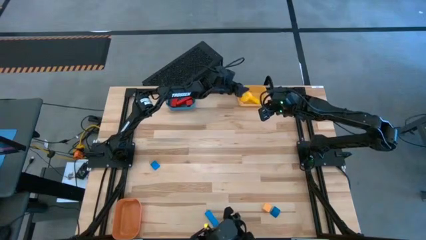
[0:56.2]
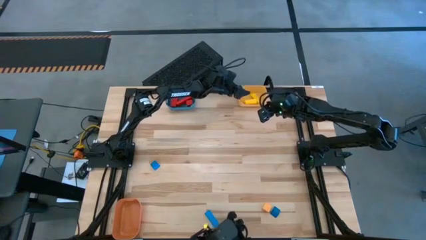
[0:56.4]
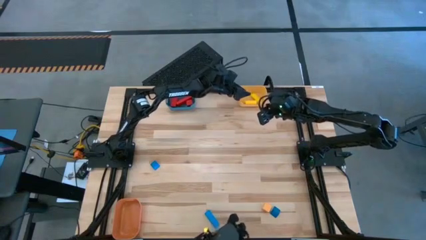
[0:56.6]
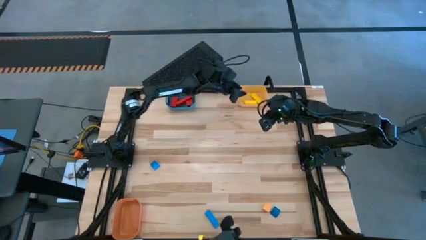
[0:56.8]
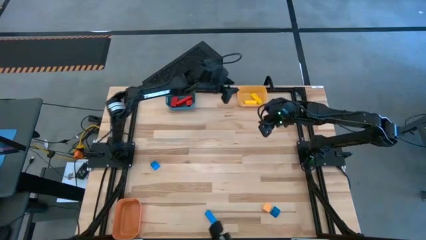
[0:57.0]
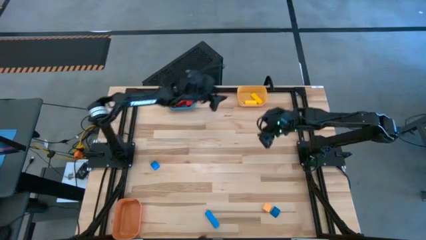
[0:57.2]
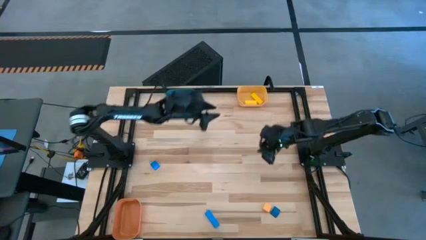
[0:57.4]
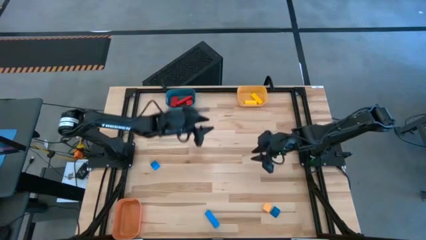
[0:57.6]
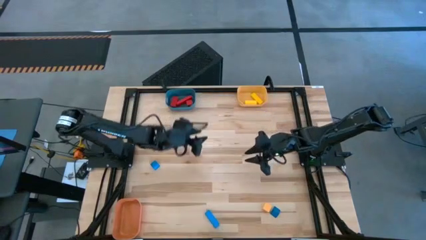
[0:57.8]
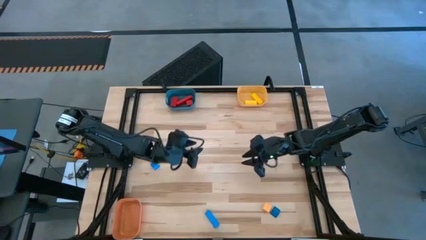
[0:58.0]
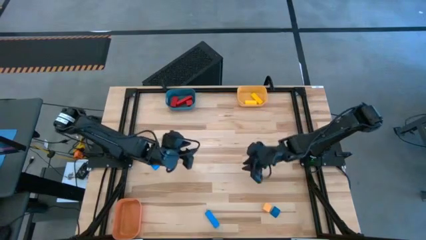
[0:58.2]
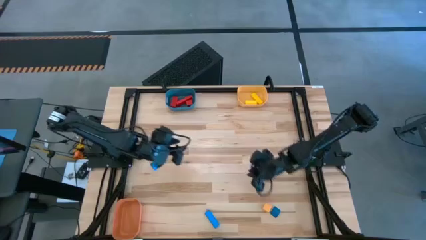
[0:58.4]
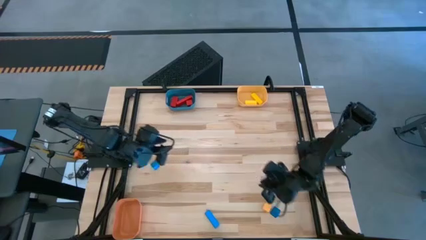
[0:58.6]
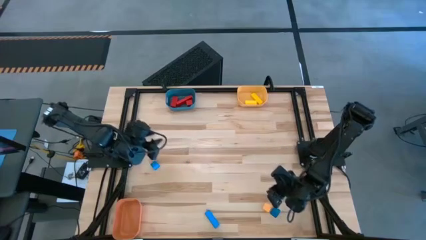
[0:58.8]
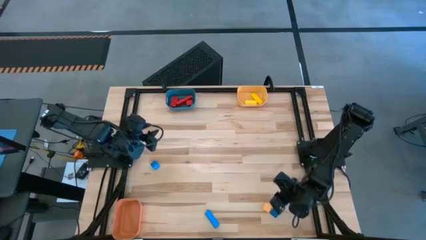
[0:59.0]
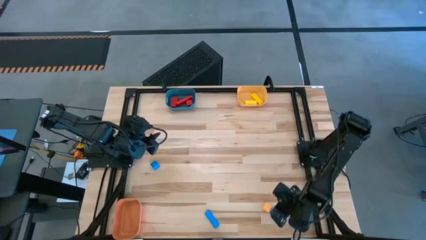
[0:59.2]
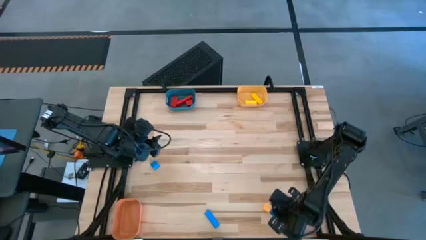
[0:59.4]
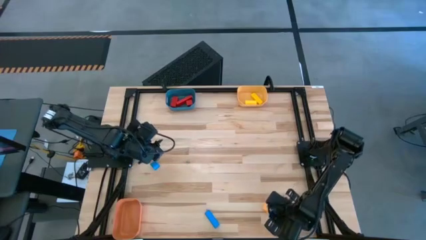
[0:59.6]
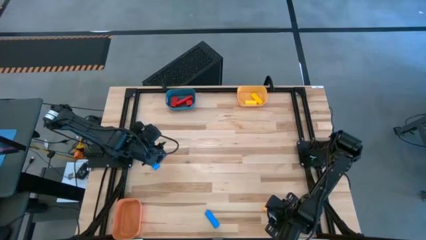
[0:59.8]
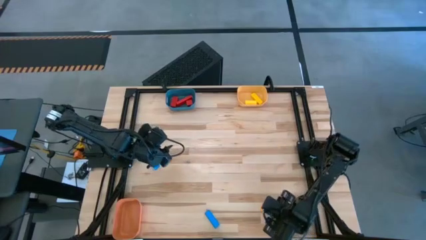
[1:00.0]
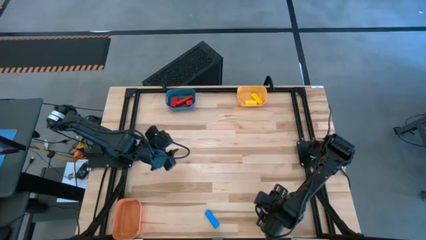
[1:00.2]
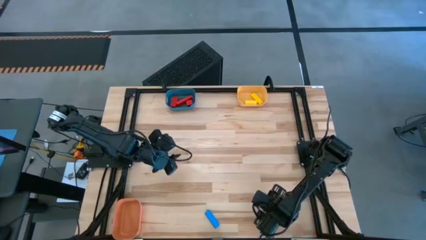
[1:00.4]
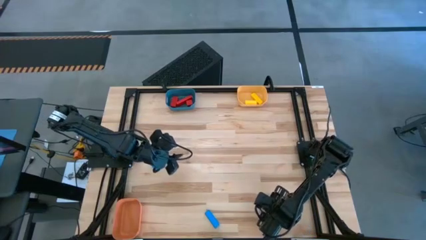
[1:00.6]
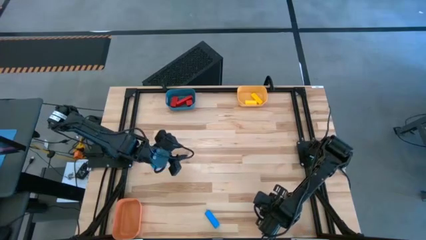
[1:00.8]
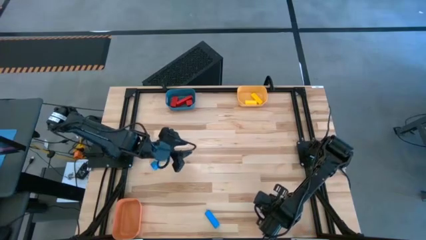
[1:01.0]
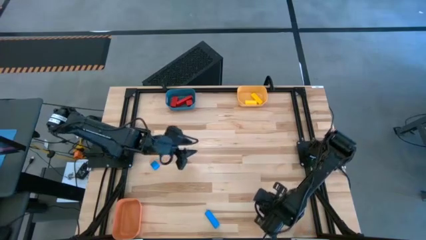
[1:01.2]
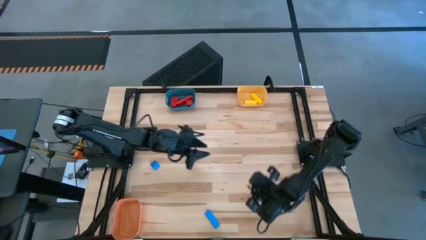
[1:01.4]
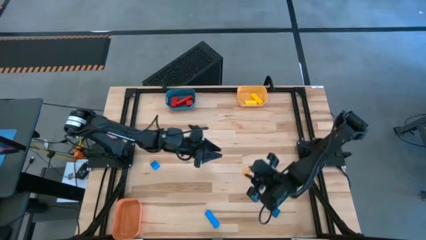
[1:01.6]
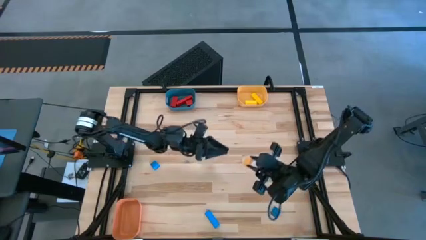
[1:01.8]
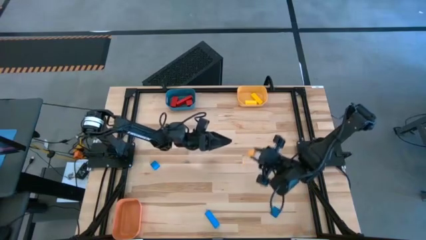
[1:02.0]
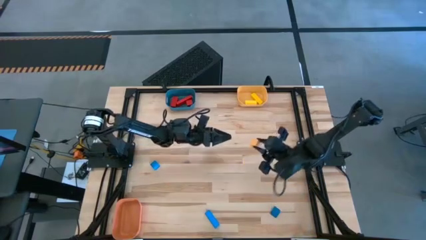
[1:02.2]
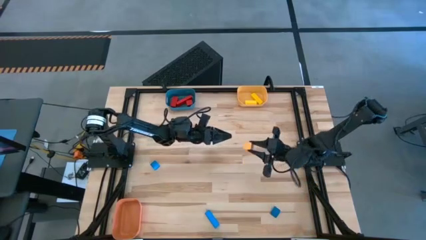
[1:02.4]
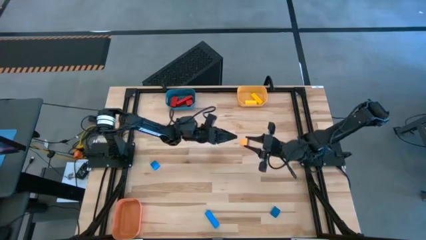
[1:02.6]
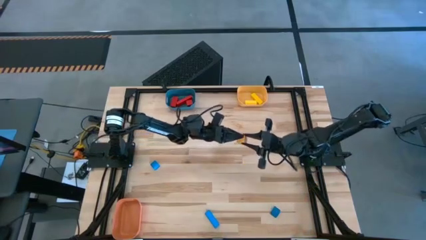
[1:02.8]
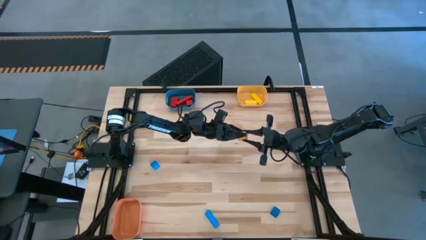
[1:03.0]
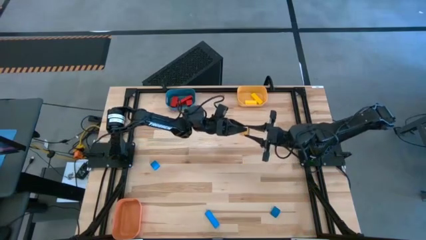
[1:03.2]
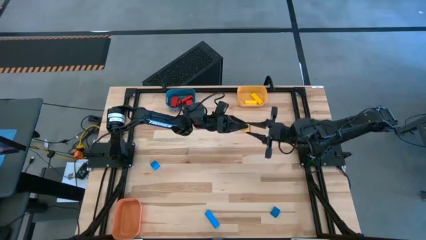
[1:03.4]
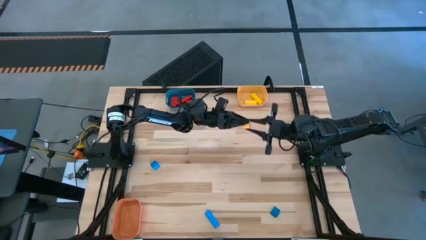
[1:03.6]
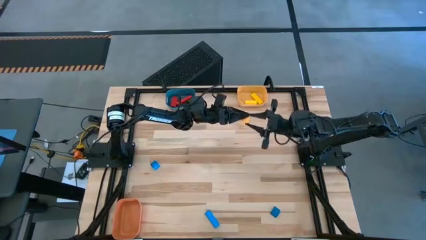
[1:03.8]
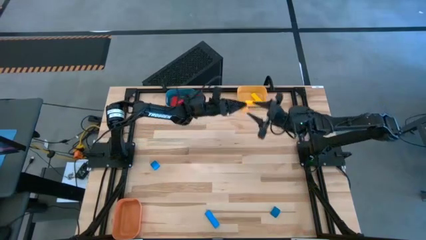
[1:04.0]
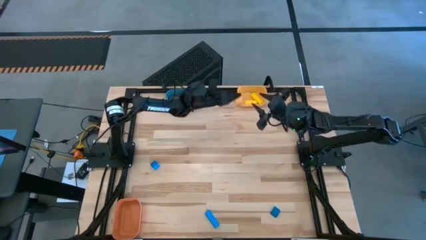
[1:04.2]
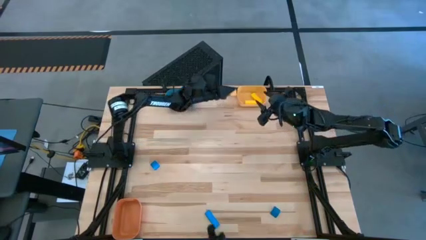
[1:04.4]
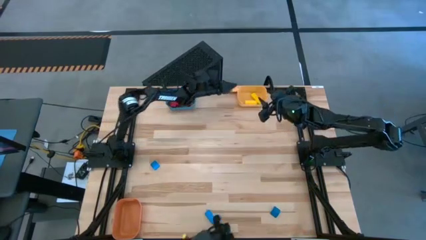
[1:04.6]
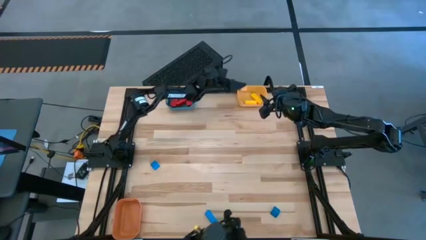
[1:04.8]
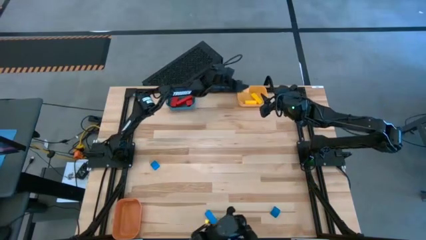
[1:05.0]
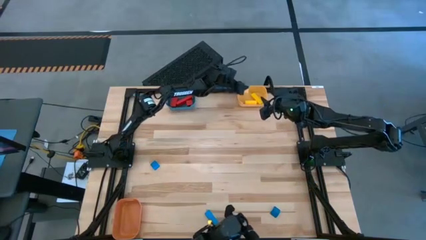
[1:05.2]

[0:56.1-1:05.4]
Task: Sort & place blocks by color
Put the orange block into the yellow bin

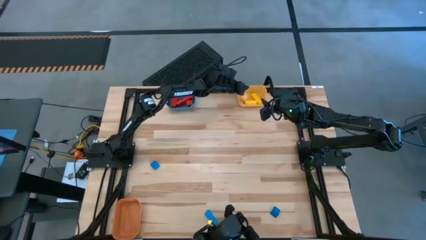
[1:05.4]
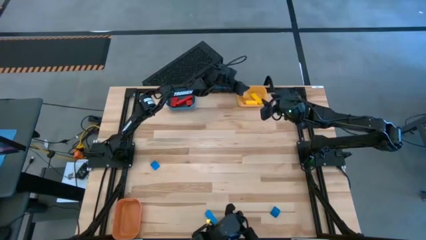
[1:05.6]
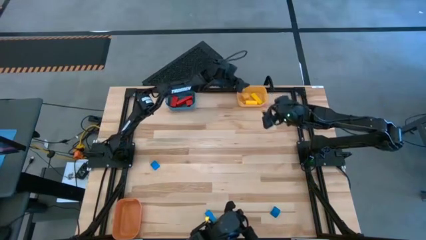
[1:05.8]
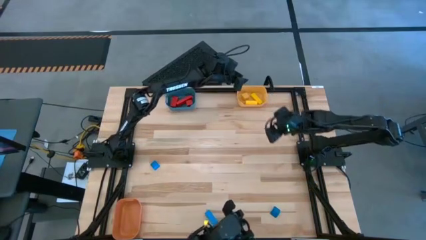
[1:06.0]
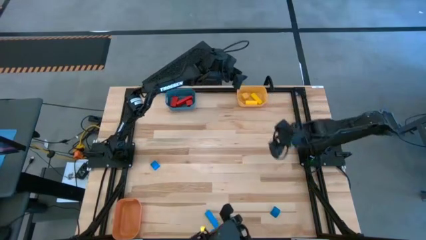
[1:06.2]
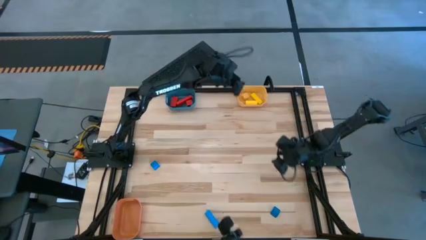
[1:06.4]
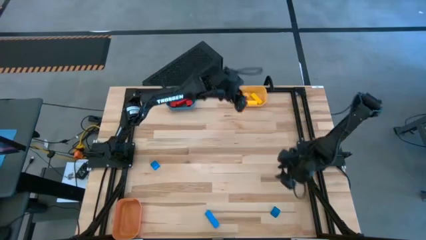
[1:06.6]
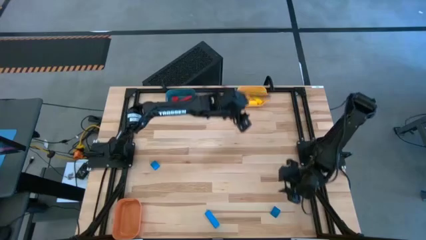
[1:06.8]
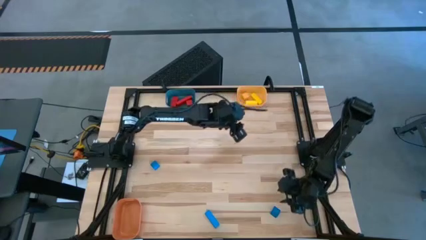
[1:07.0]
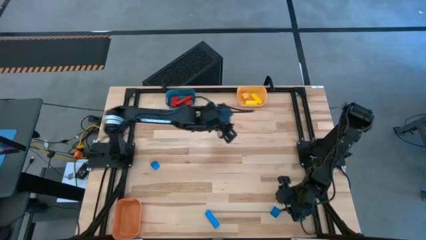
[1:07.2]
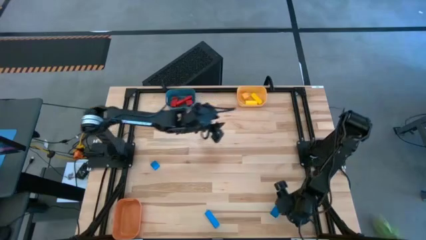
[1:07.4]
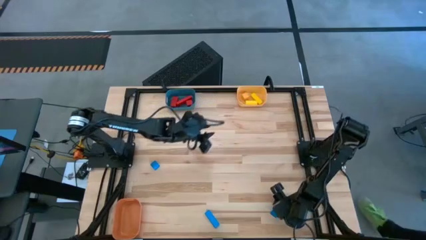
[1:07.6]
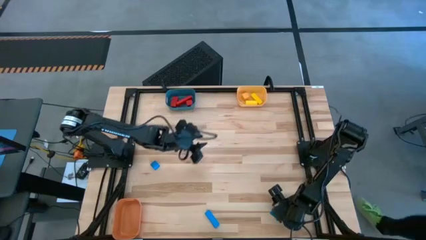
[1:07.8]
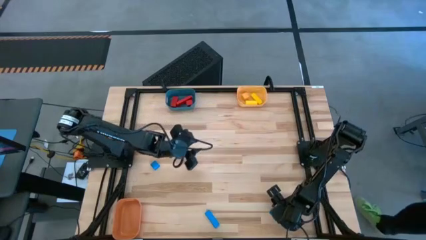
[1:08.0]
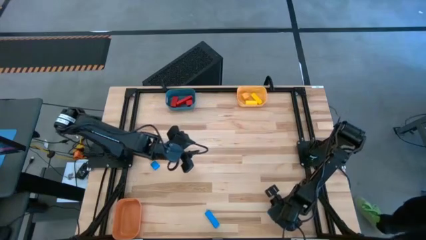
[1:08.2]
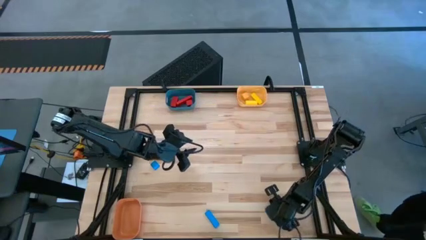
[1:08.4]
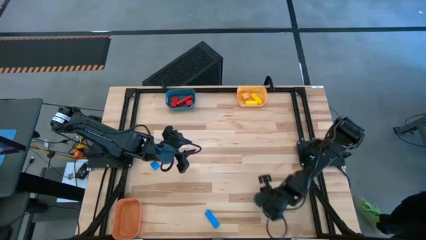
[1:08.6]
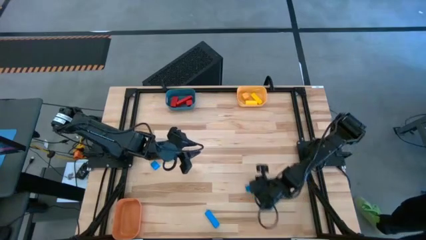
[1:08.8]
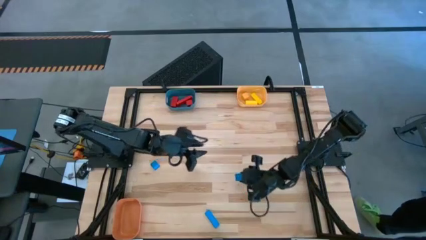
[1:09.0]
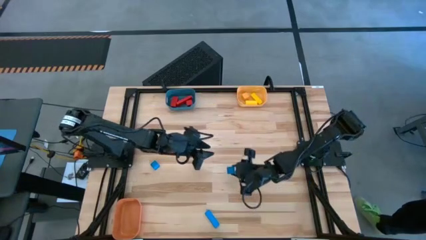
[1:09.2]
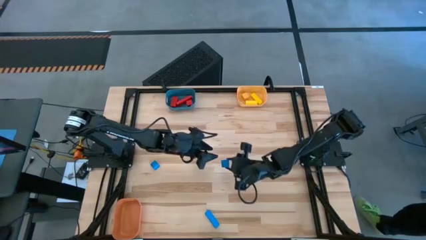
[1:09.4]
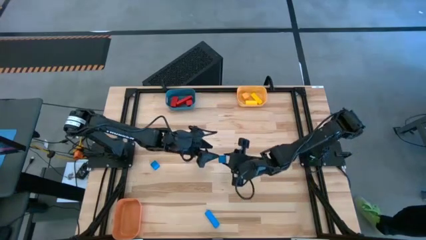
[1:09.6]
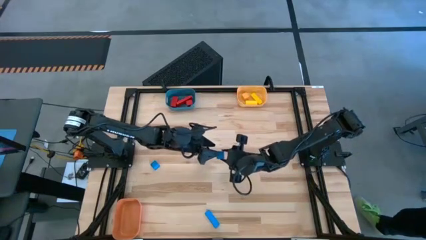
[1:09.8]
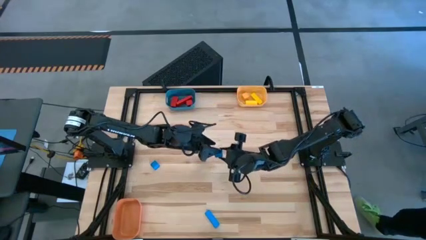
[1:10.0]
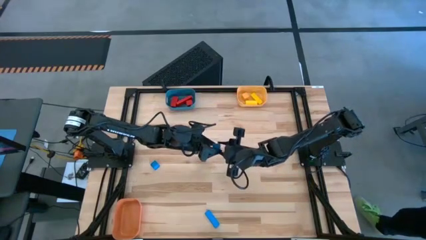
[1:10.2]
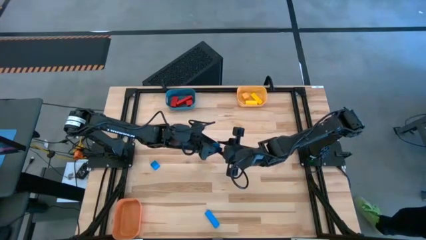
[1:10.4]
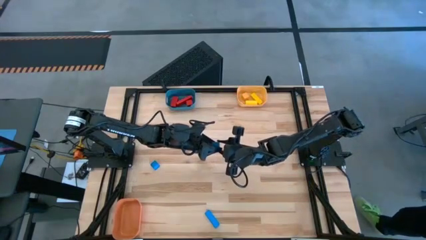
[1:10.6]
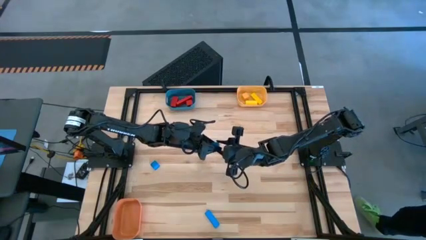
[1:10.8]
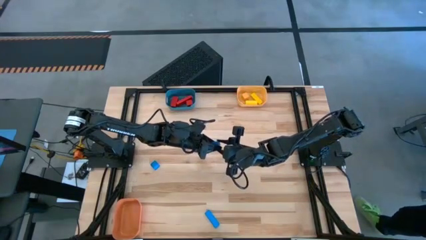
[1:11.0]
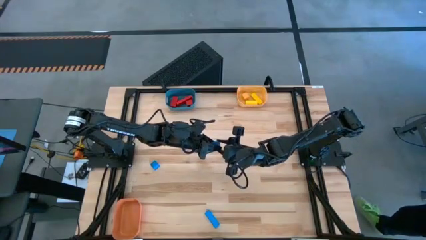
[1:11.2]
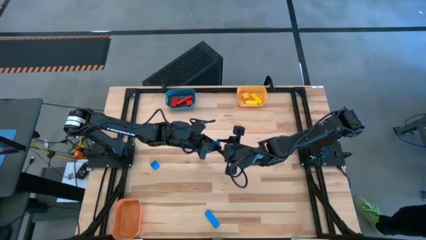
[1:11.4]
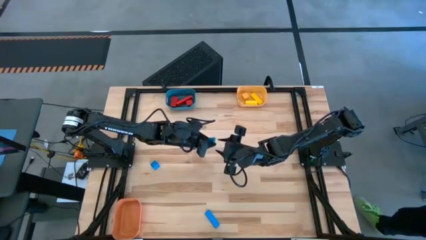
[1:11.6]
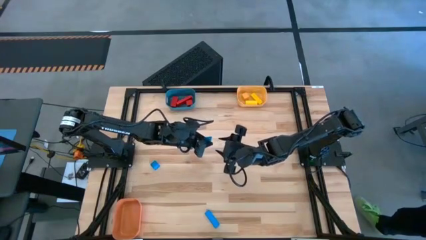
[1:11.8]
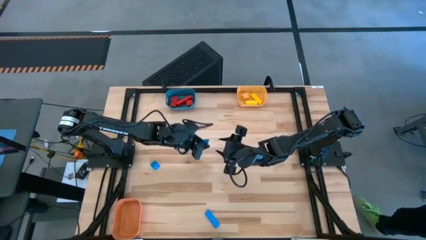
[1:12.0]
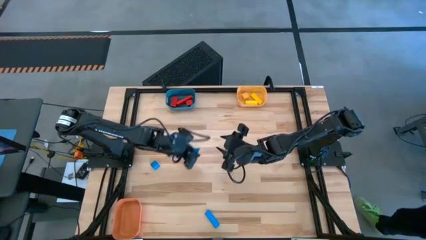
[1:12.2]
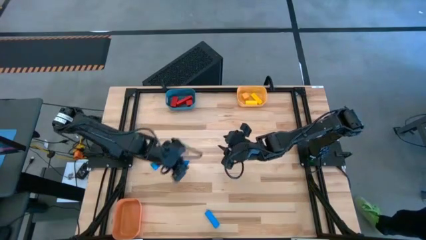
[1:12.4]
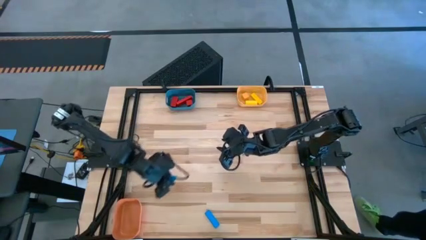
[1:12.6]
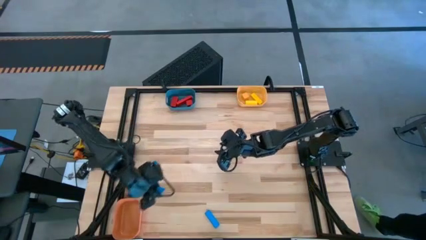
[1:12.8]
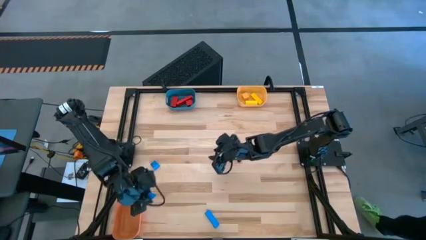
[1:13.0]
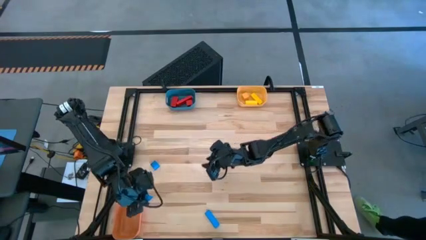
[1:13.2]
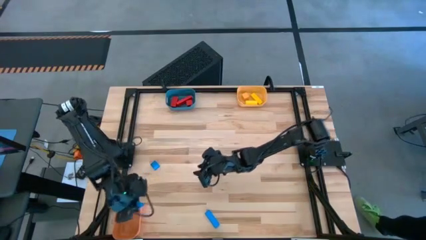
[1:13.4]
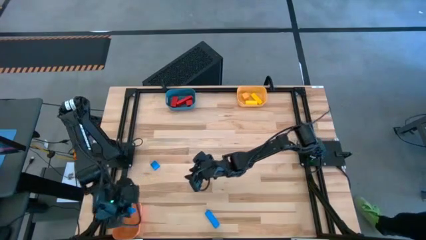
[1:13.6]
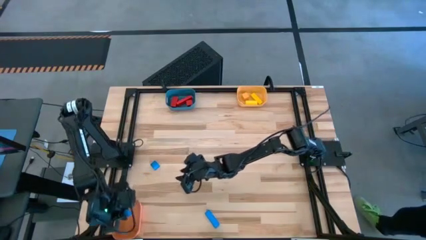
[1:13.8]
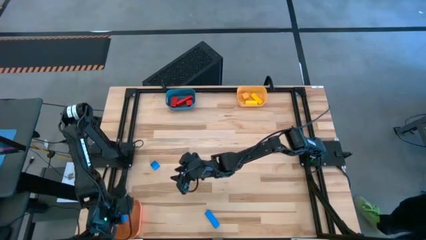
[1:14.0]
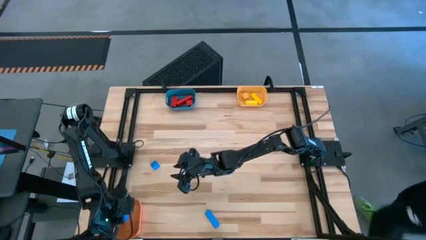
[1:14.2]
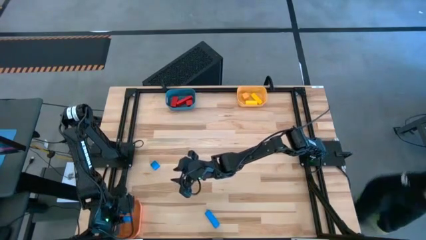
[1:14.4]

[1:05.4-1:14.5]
Put the bottom right blue block into the orange bin
